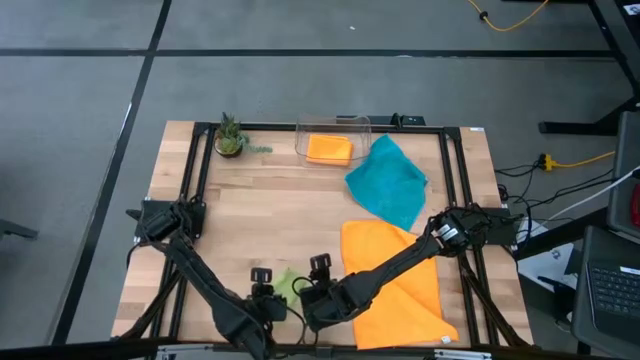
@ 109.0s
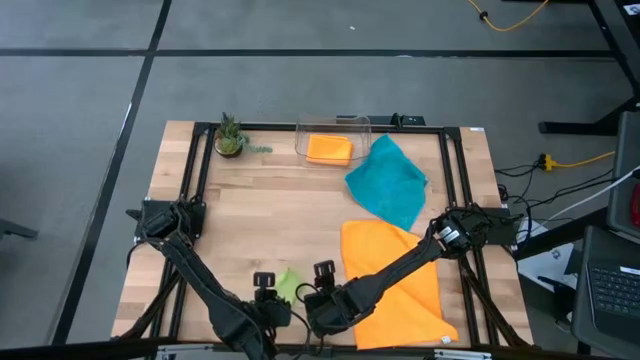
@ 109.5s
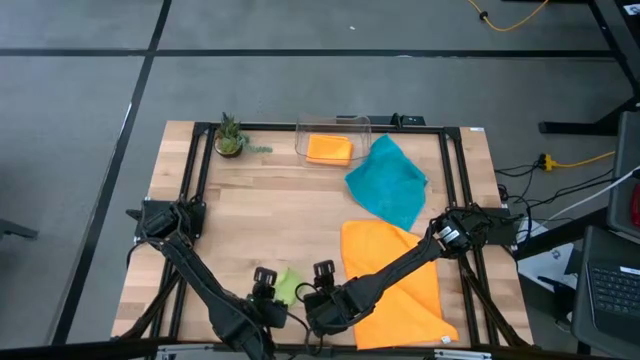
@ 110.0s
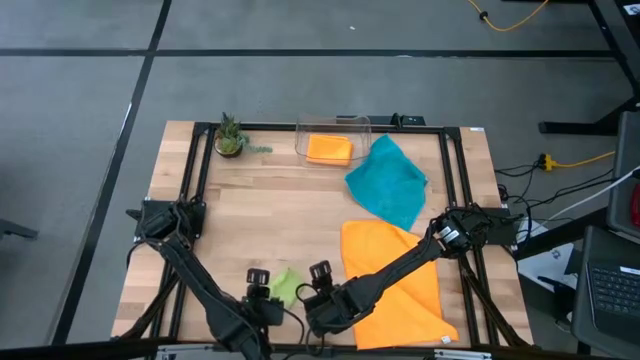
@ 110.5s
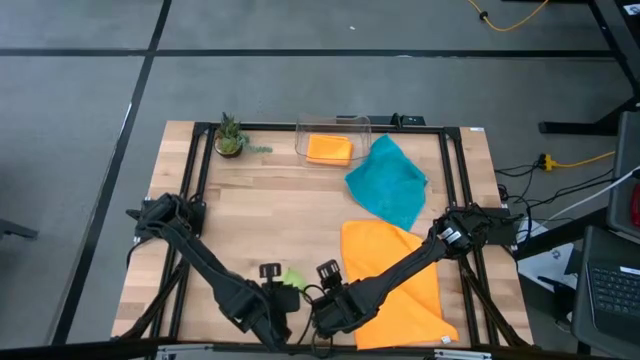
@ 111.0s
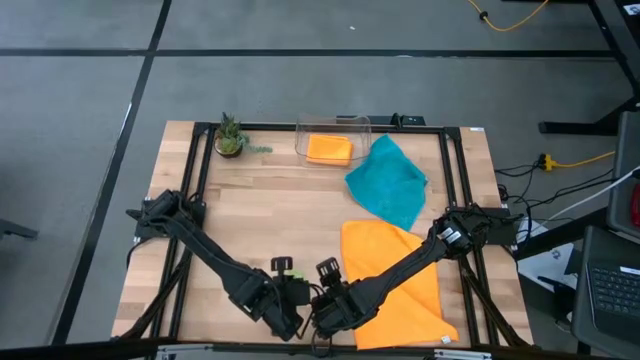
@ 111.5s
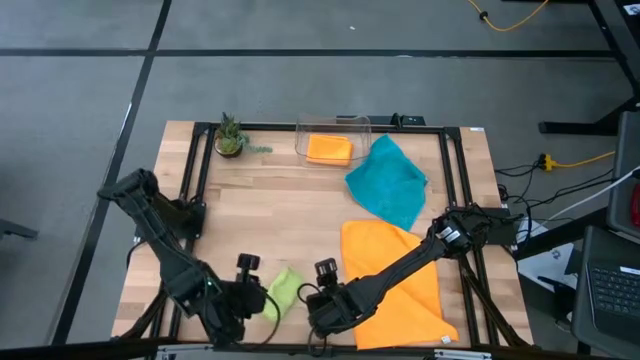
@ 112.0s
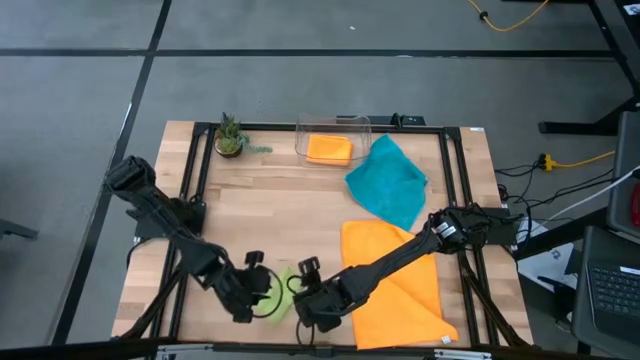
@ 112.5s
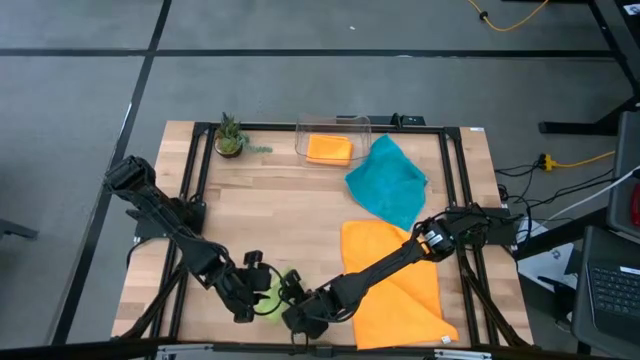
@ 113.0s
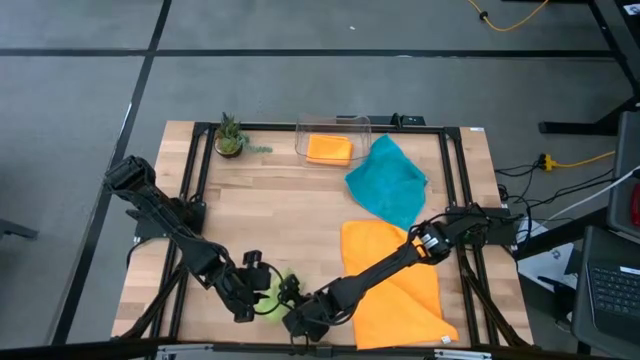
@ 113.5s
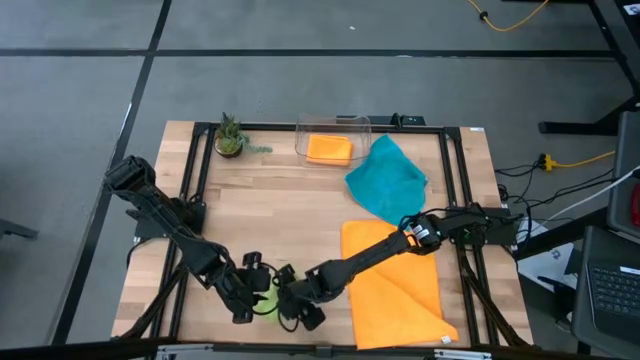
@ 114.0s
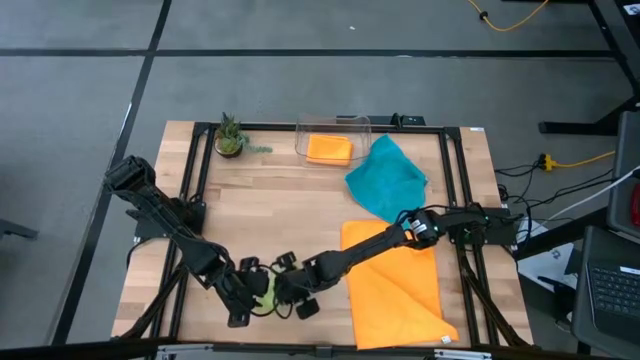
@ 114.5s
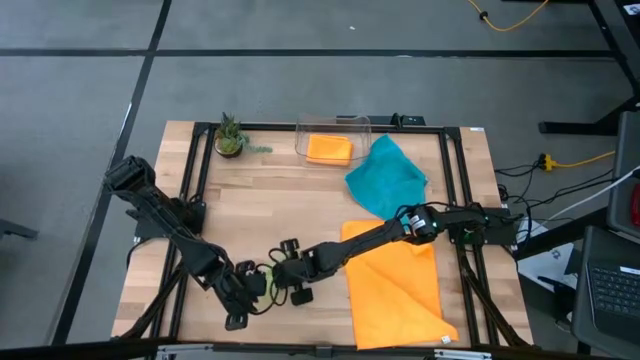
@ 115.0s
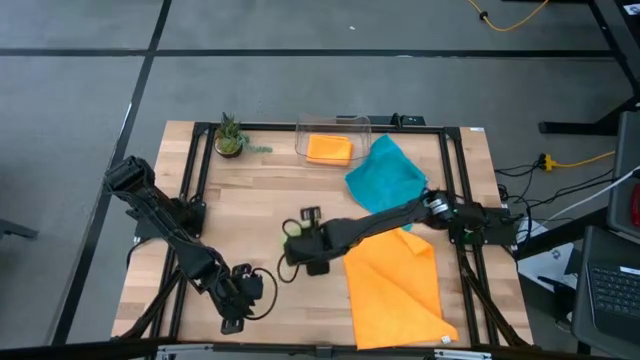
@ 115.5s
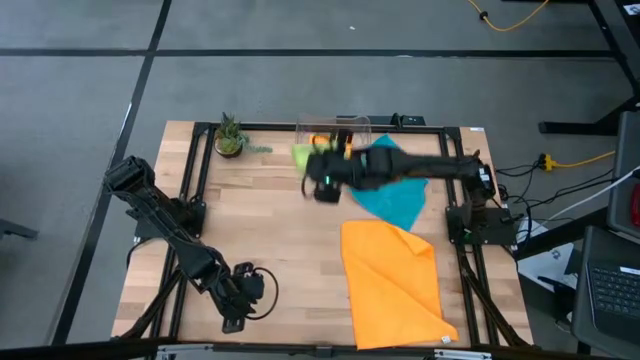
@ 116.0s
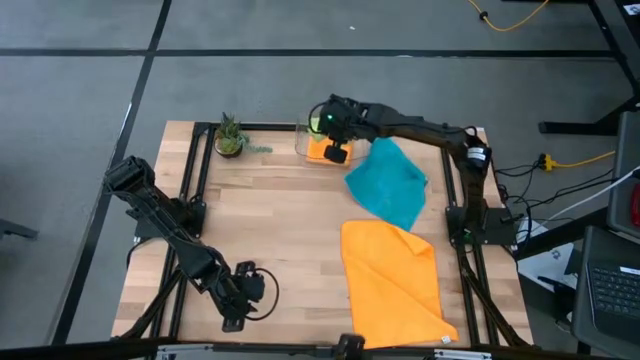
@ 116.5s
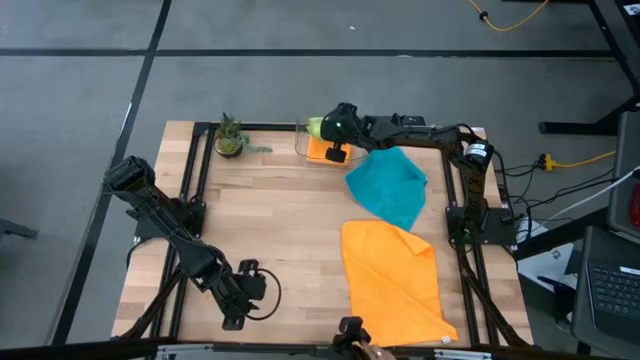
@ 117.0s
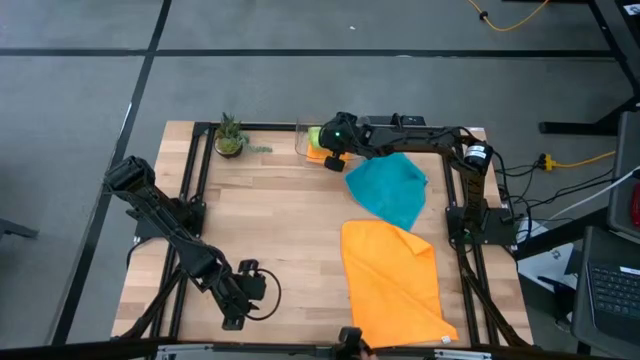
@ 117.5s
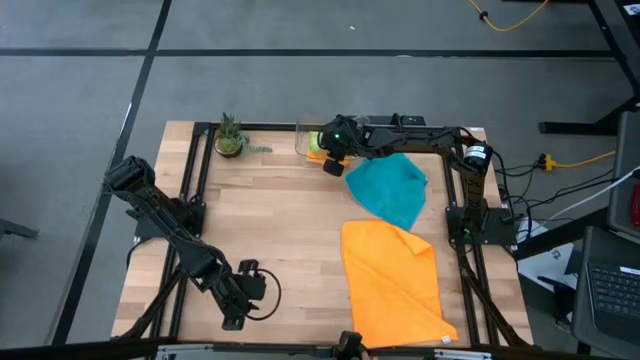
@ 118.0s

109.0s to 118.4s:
Task: Fold microfiber towels
Put the folded green microfiber cloth into the transparent bin

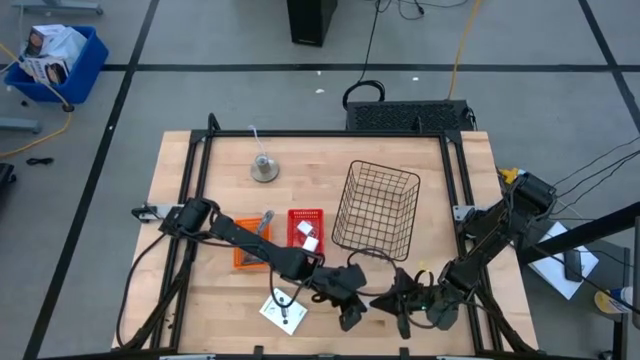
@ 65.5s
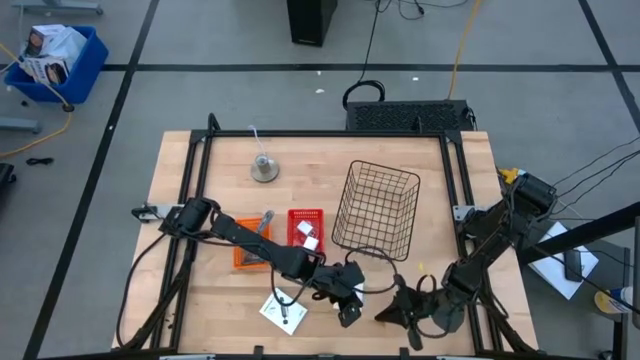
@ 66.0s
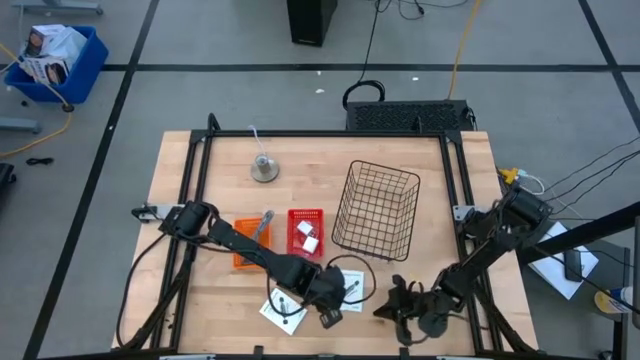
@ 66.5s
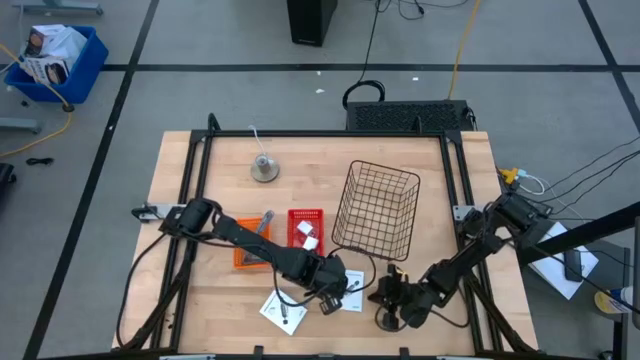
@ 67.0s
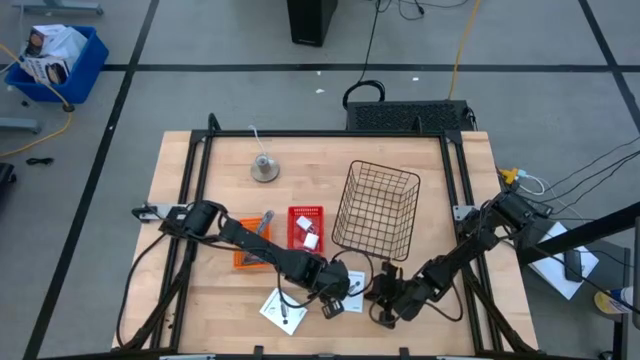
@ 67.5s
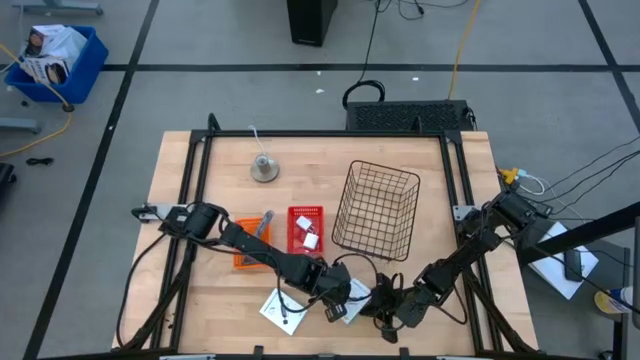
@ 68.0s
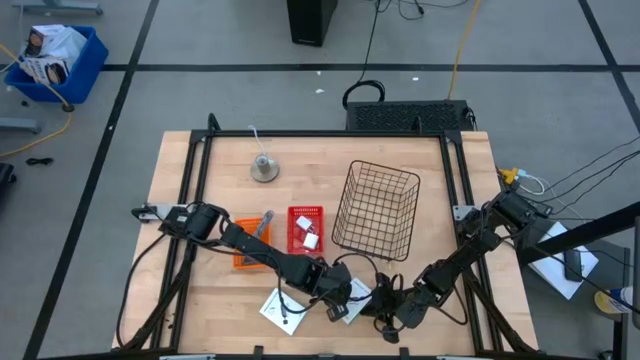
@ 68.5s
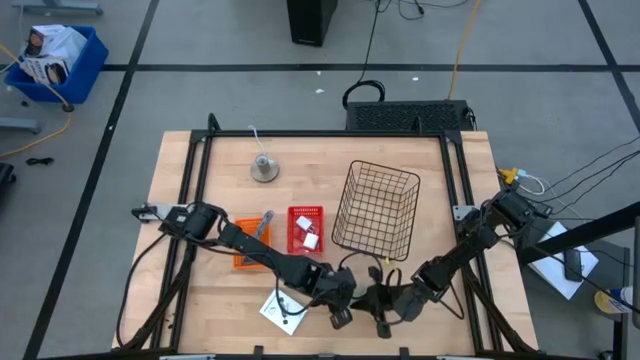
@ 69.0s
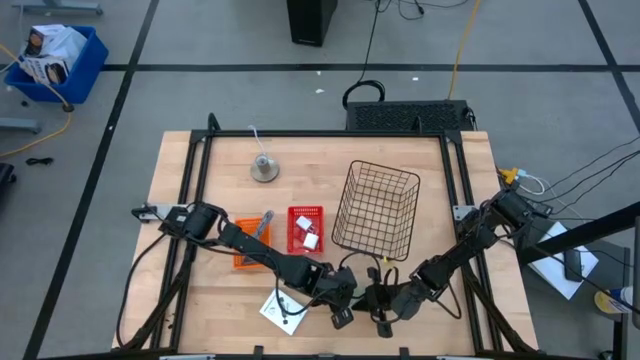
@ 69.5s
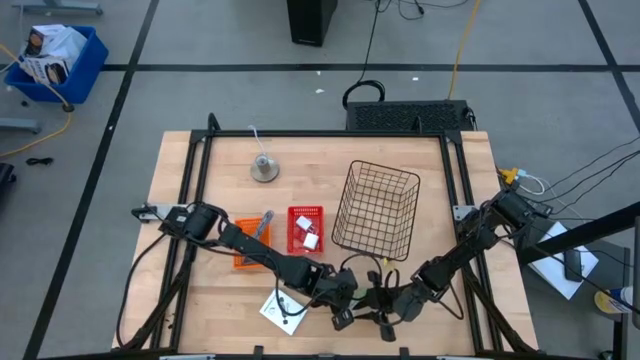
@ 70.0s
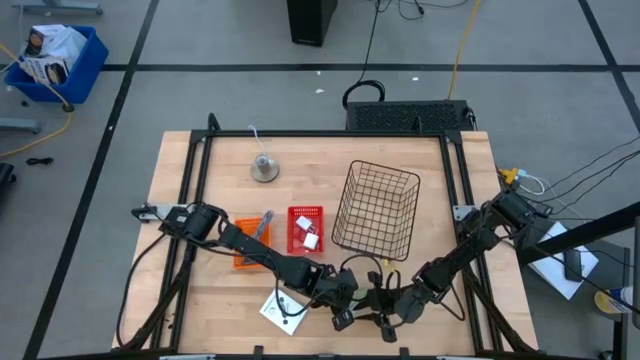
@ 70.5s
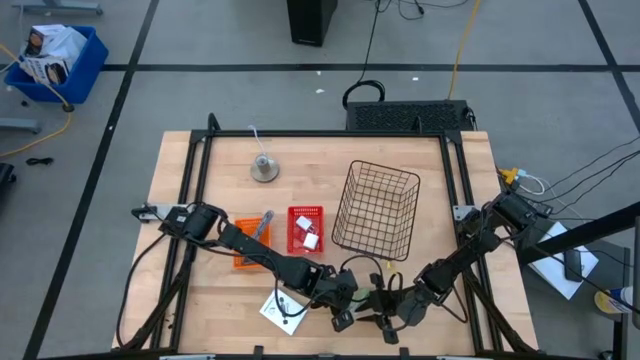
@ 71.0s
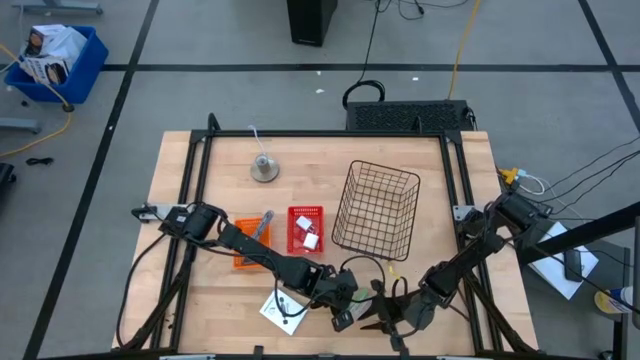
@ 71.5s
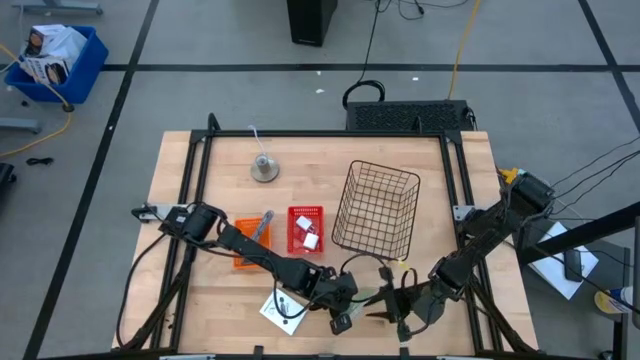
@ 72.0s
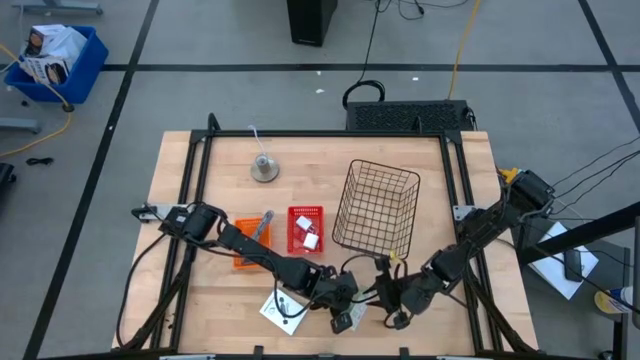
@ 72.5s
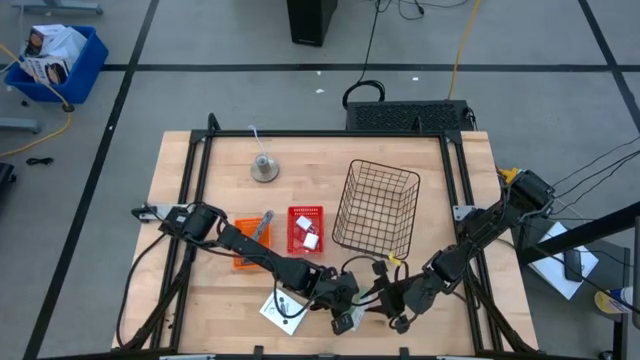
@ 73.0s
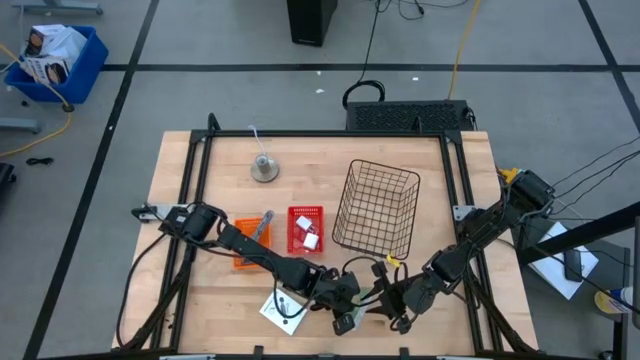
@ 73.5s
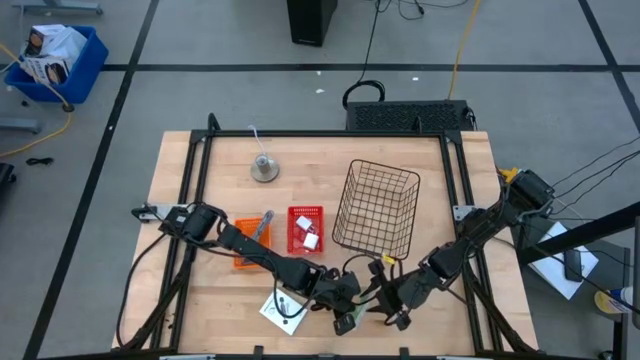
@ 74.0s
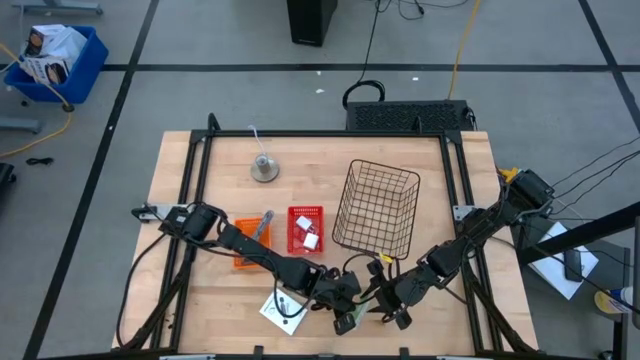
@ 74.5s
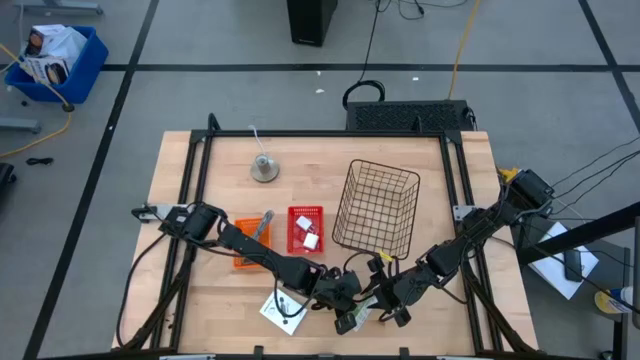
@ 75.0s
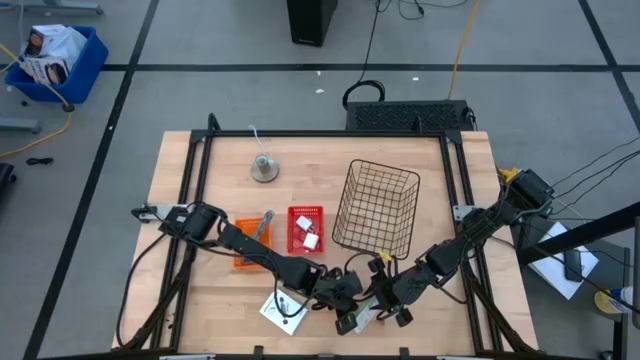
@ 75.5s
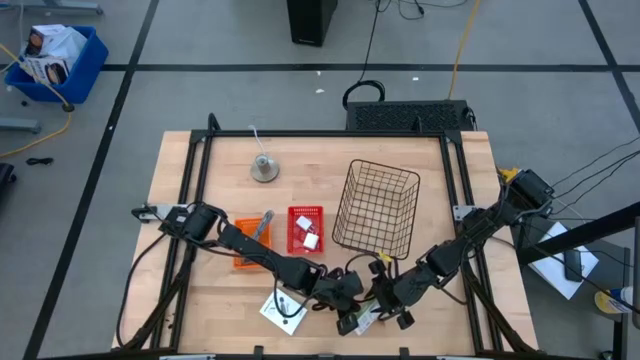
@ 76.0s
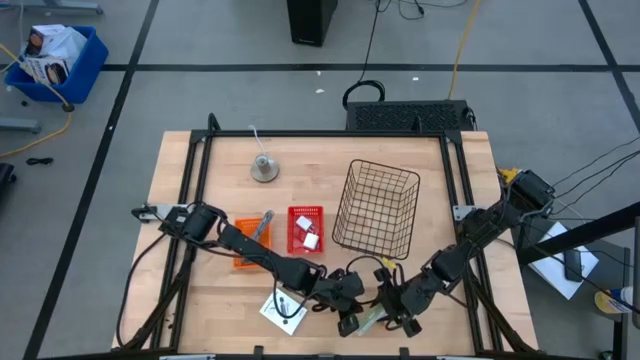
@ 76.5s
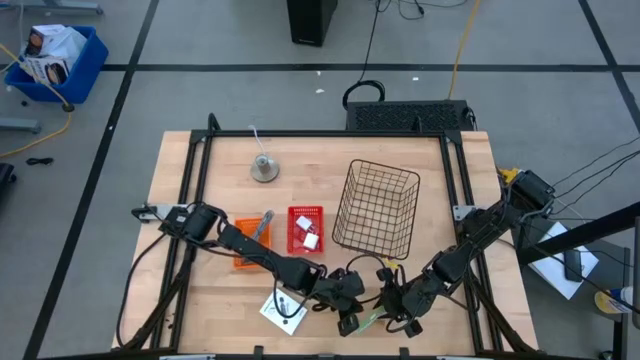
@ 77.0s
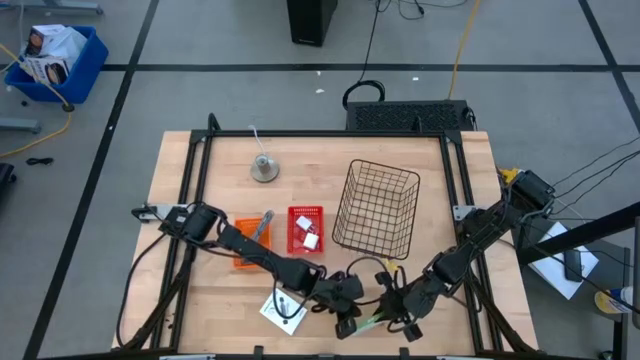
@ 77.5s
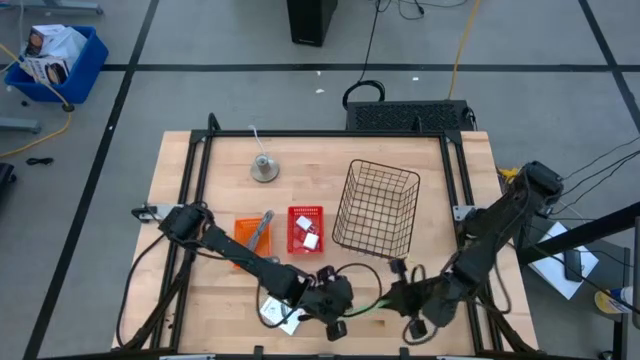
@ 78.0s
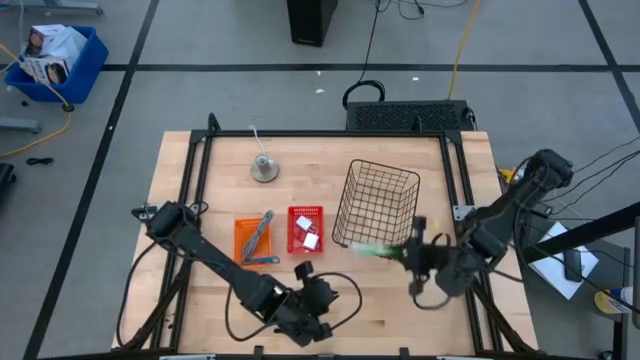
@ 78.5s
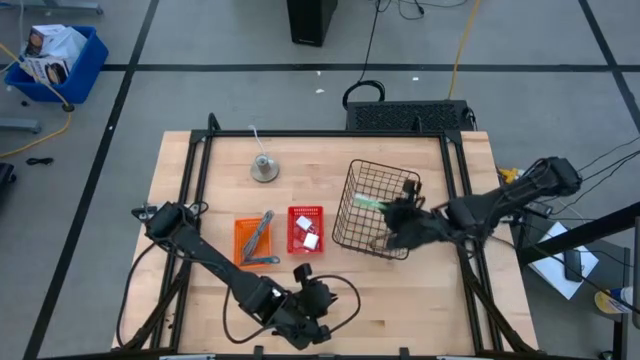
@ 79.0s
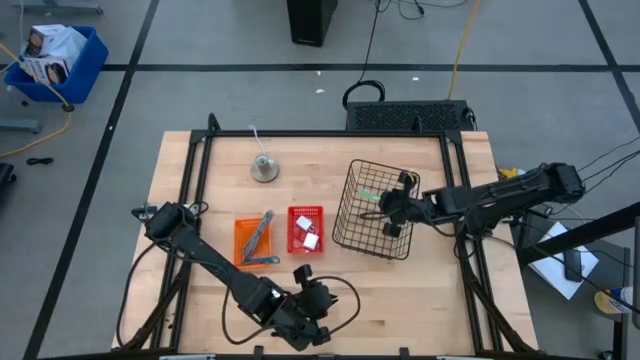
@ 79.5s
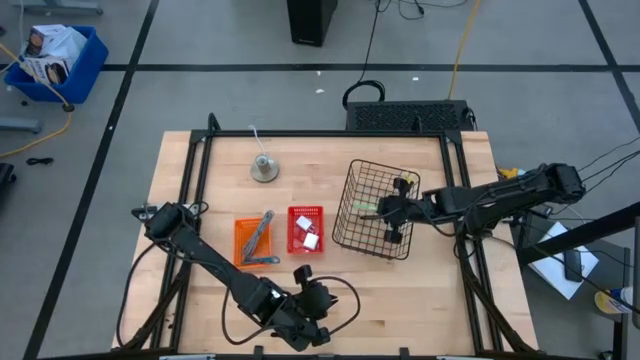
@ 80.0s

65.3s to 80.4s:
Task: Pick and place items into bin
Put the right card reader into the wire basket
